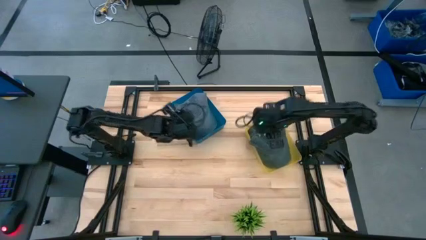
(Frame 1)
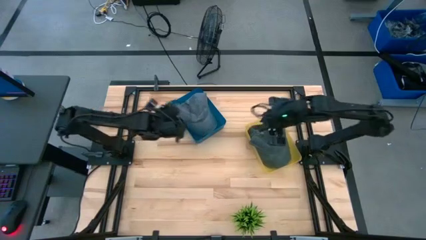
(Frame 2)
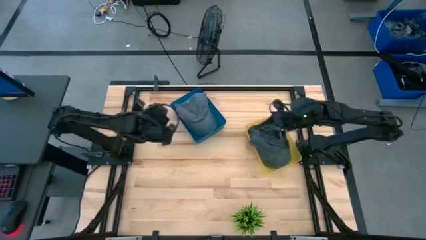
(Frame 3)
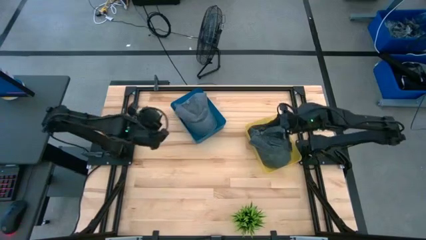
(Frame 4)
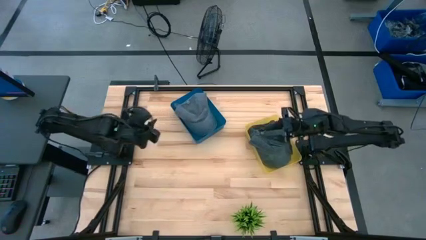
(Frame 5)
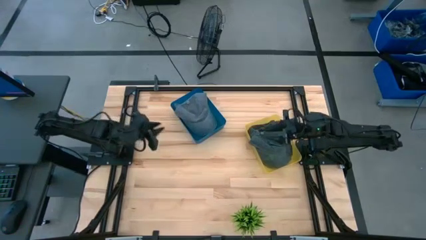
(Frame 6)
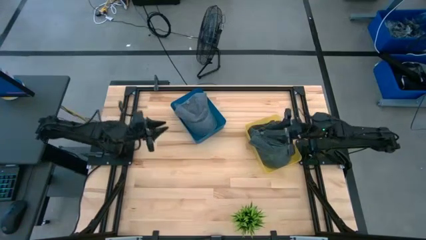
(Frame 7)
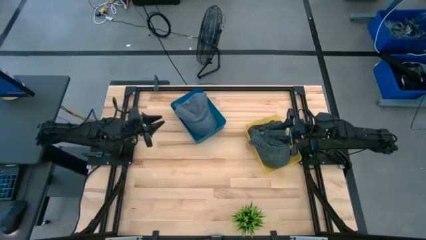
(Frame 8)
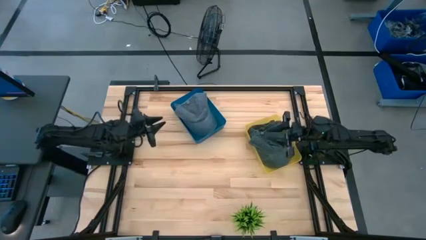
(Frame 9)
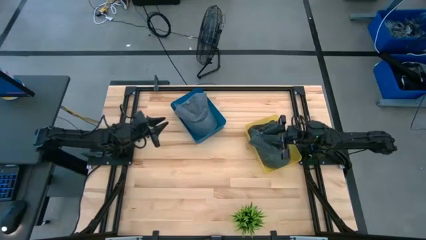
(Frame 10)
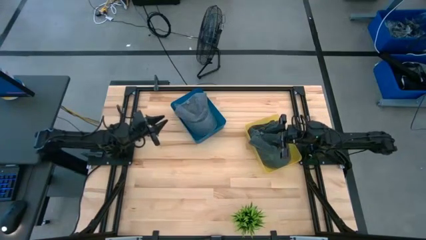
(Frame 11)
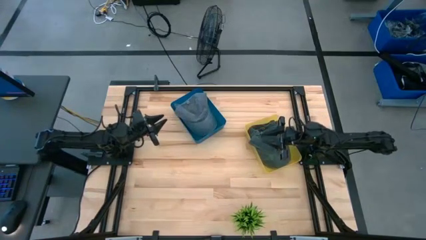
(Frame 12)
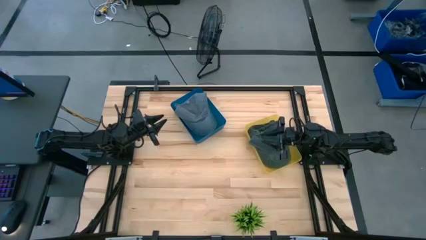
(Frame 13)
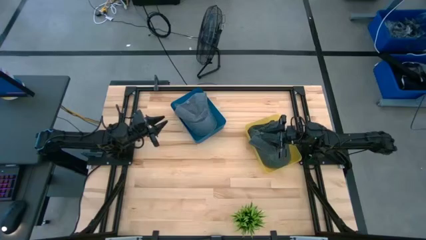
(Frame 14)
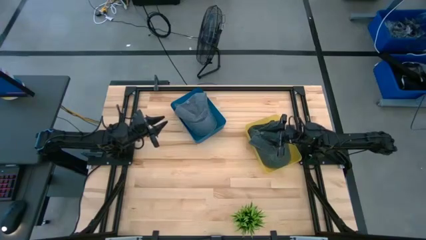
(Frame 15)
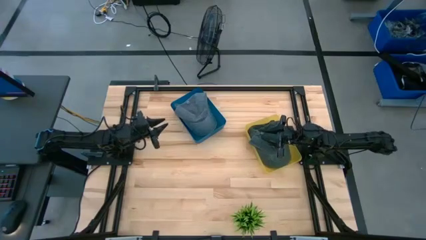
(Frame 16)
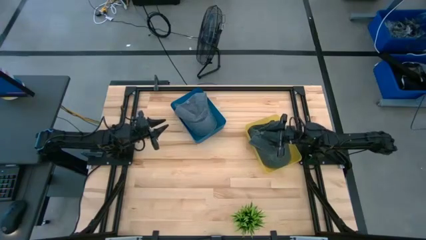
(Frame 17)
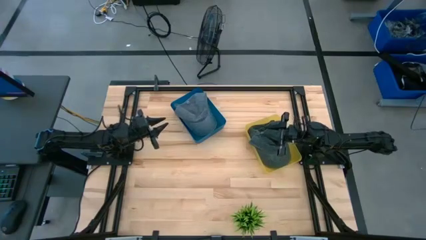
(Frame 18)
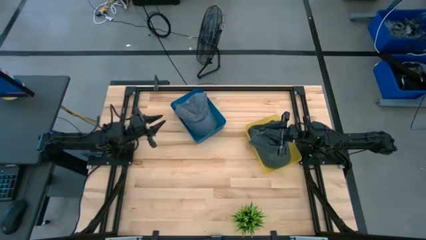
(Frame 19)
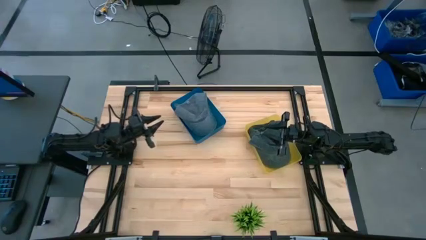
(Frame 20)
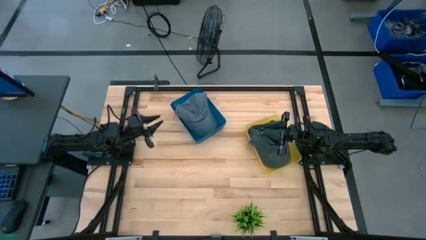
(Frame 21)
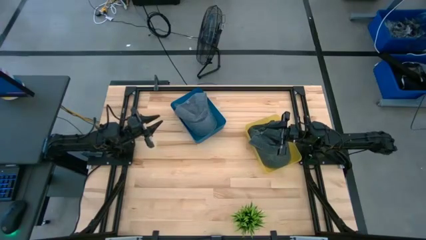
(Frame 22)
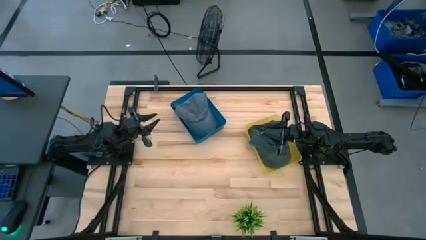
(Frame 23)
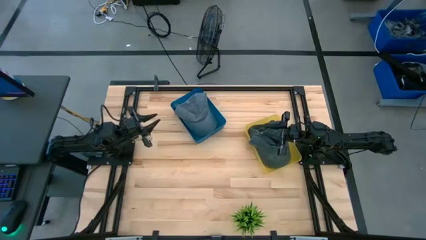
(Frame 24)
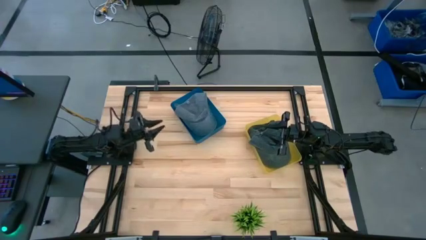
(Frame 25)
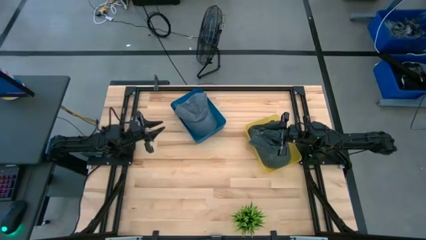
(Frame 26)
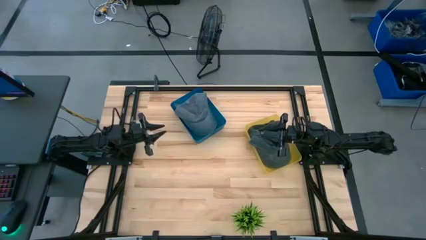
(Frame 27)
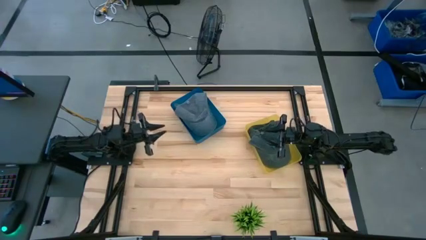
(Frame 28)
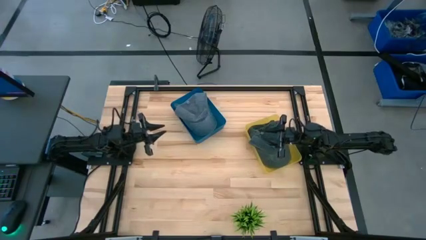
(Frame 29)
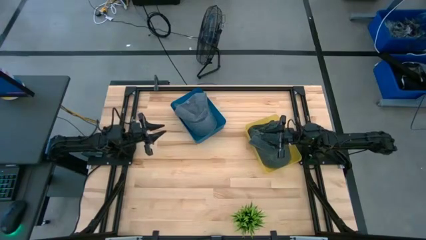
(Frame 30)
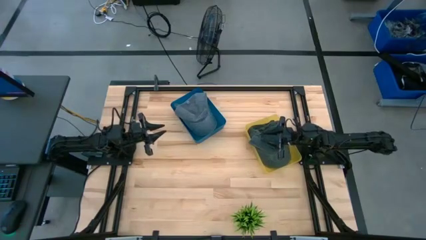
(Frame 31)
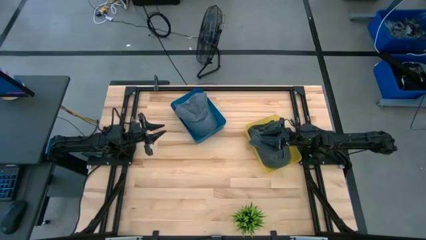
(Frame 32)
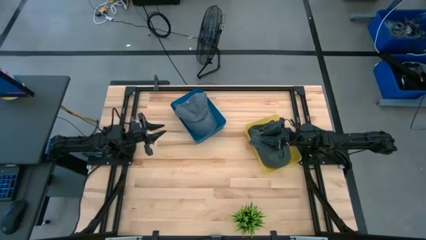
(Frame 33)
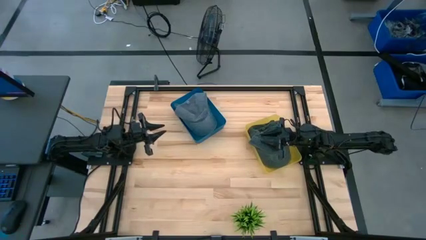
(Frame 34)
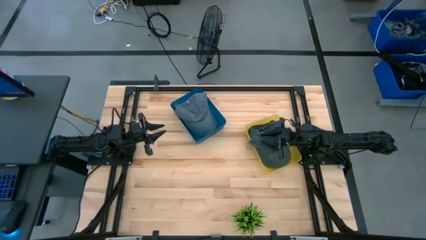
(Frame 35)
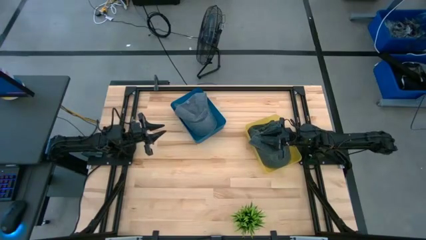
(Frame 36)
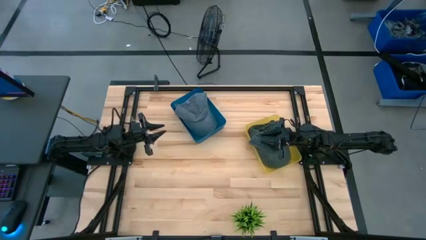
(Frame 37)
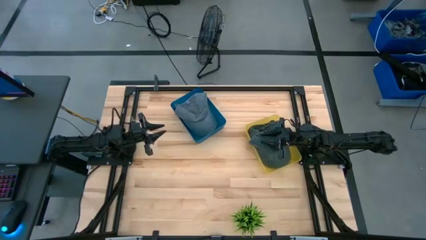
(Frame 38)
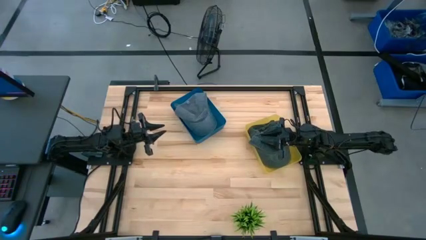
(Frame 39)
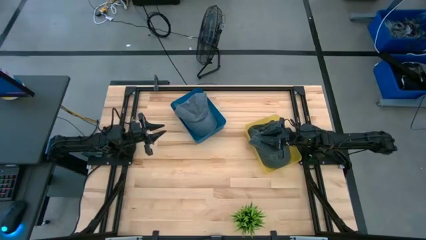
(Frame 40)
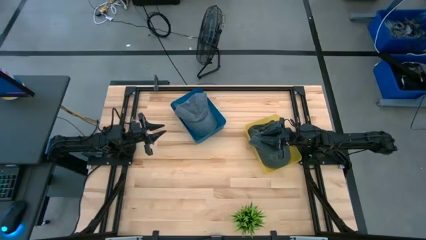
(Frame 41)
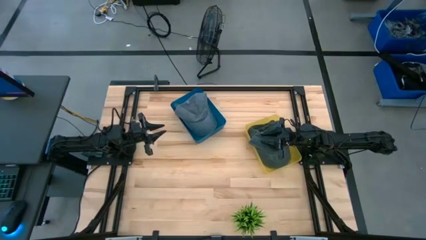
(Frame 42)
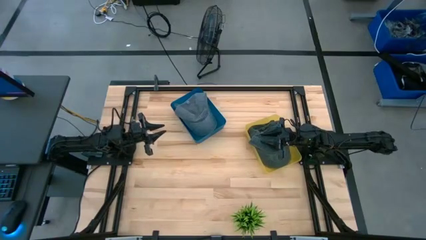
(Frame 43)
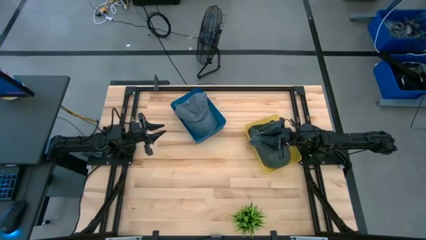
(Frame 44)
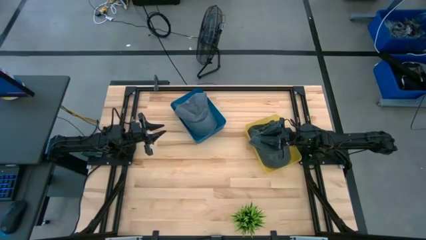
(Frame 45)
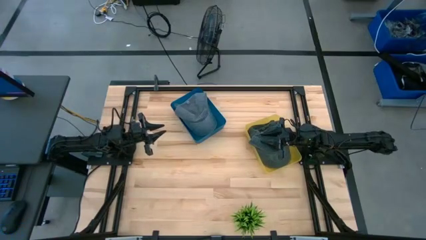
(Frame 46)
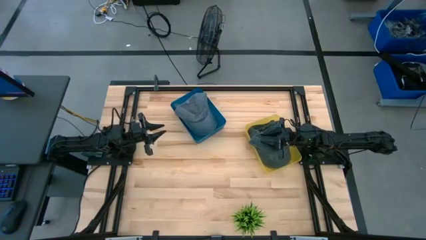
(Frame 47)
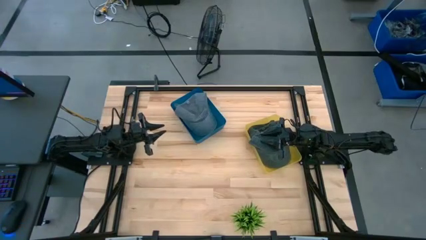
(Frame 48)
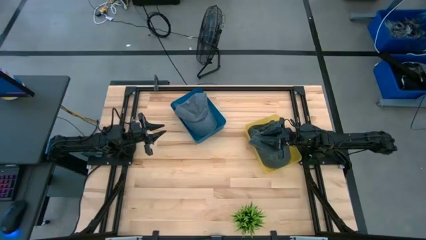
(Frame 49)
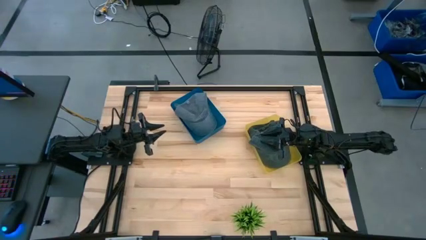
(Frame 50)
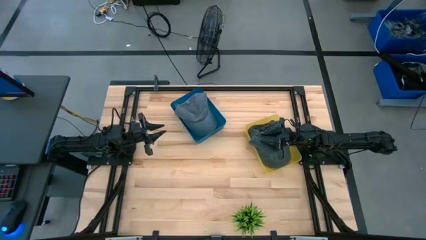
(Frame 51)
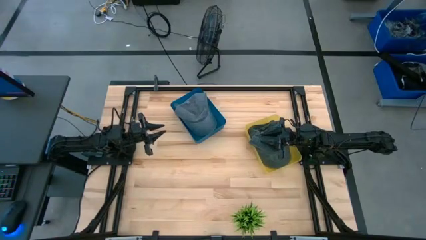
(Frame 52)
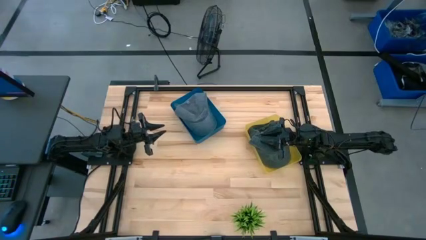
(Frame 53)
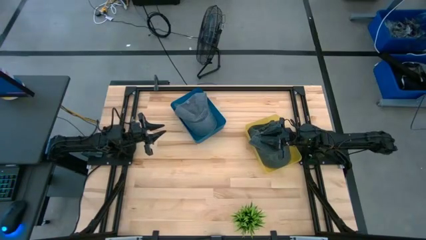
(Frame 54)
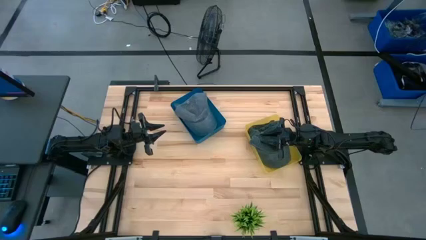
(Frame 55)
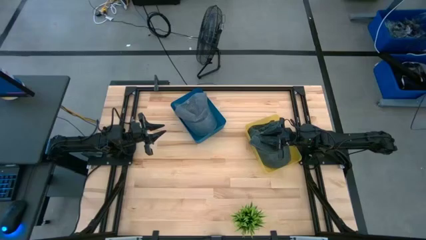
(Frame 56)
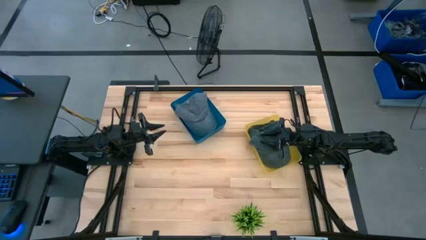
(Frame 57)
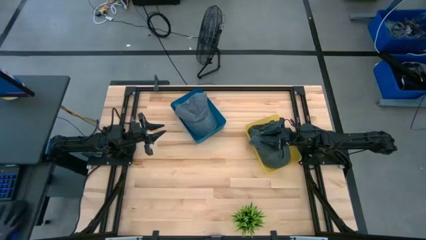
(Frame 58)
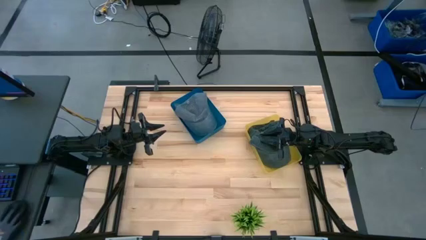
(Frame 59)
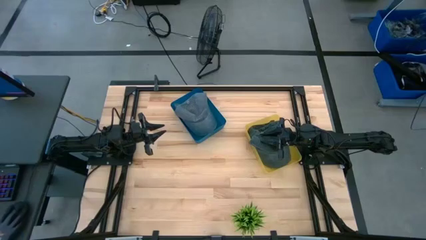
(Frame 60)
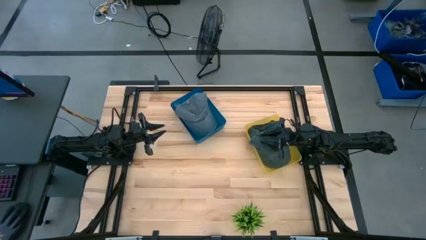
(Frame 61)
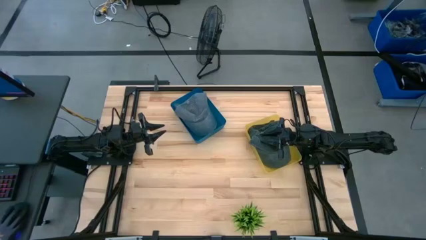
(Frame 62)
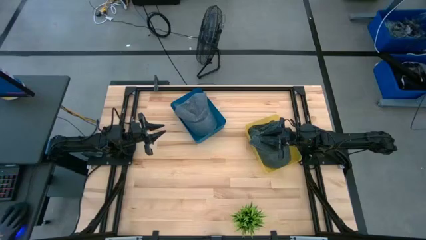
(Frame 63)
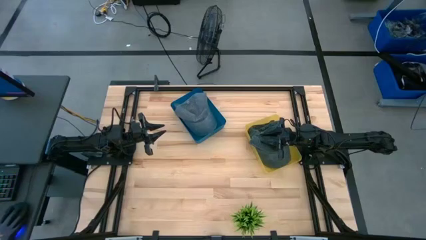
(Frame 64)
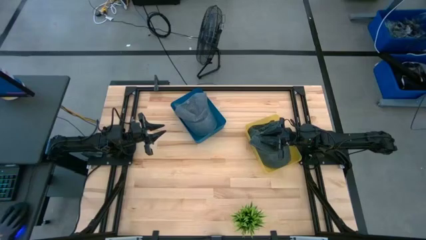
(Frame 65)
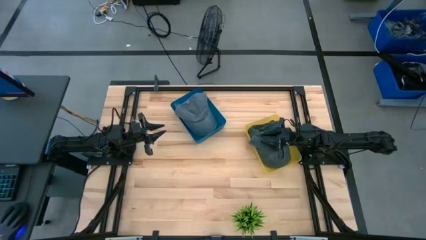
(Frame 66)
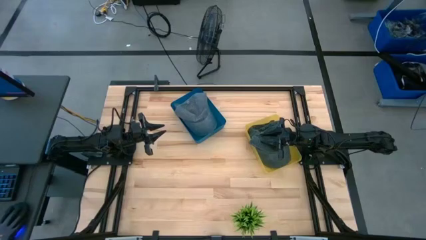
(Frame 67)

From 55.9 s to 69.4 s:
Task: Pick & Place hat
Return to Home Position

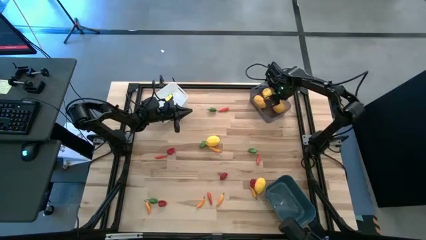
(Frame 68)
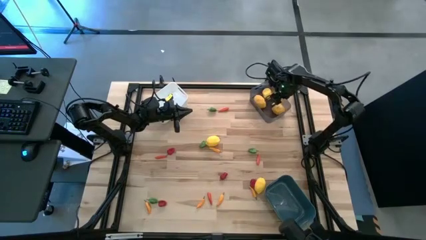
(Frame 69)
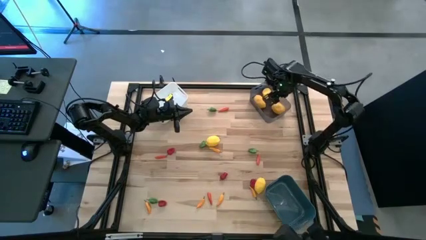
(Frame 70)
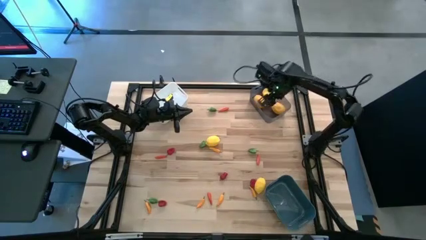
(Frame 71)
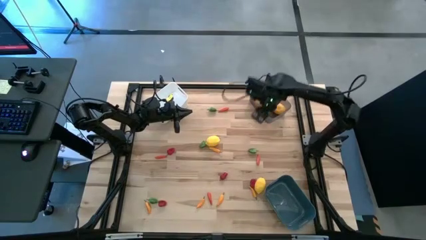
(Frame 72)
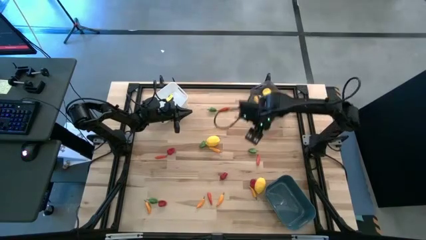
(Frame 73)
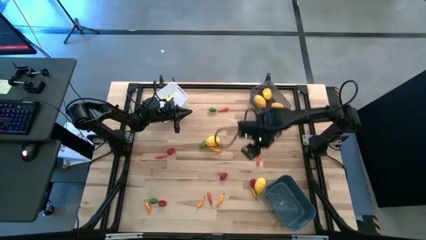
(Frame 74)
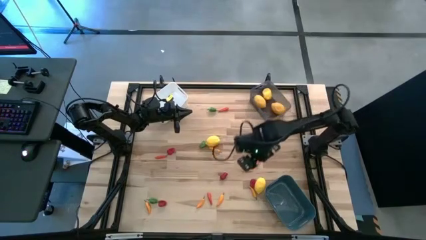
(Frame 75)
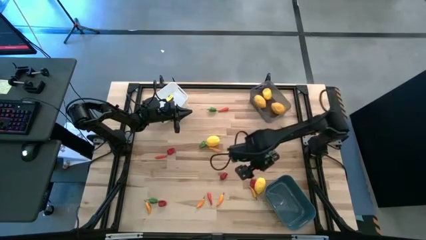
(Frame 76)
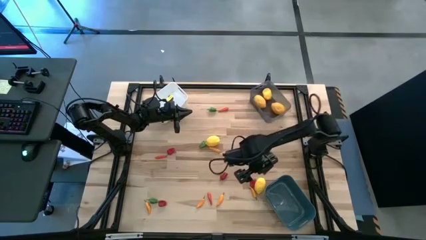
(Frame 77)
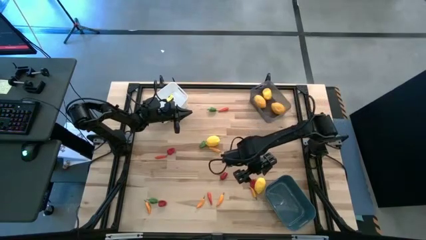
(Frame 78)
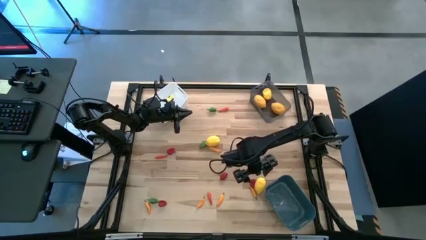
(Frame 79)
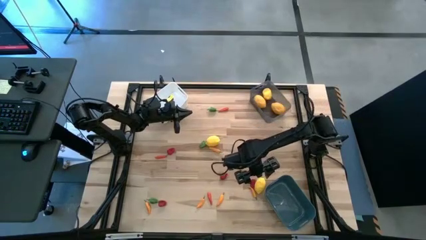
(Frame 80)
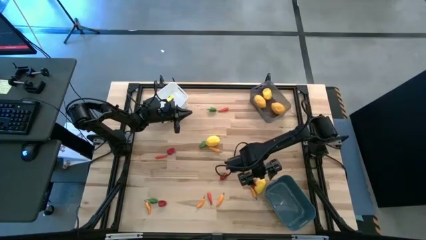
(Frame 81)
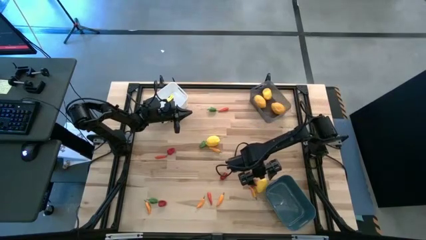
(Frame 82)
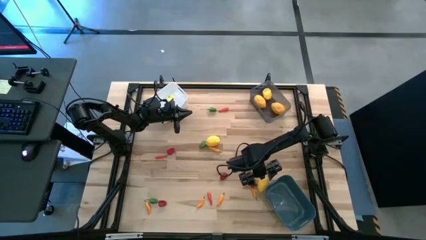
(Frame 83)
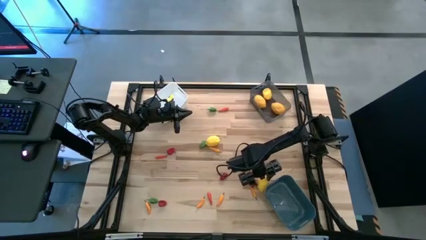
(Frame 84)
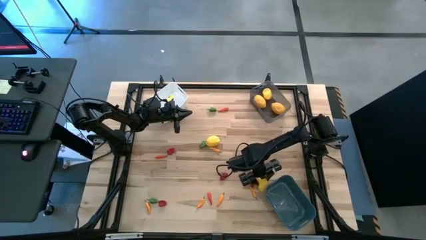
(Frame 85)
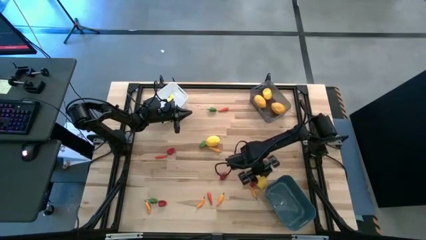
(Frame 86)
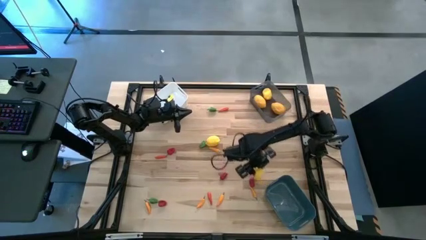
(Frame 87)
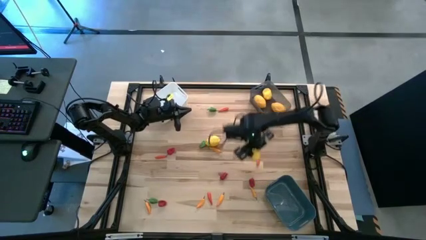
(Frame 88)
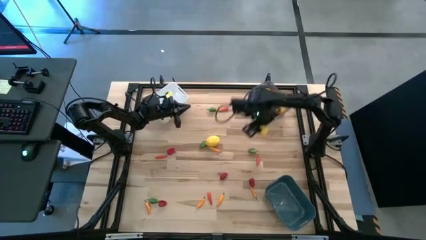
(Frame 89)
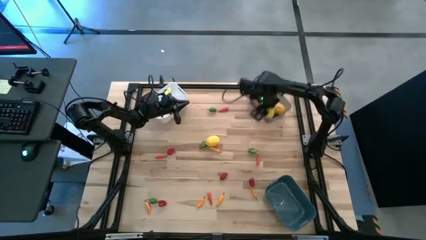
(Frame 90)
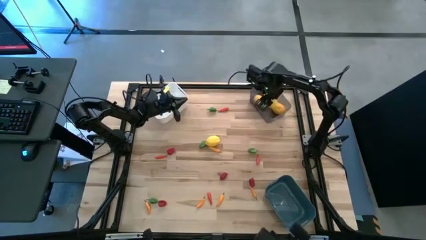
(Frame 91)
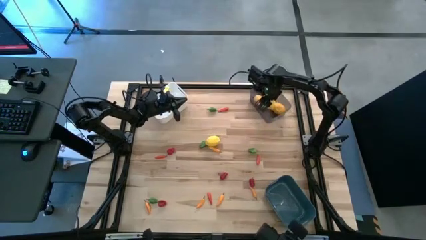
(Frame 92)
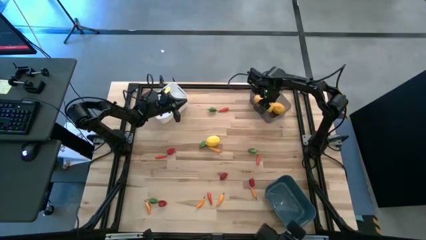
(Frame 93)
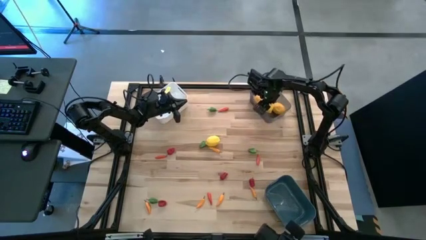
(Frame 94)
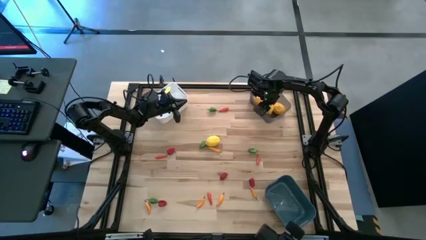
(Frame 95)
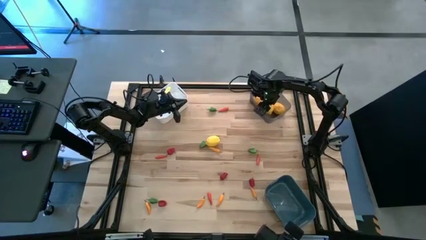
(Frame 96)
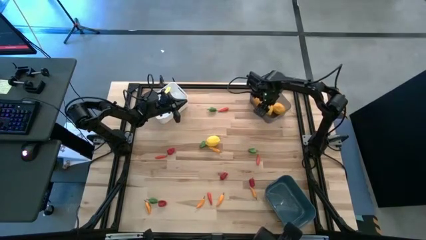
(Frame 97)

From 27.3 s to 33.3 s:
Task: Sort produce into baskets
Put the lemon into the black bin
